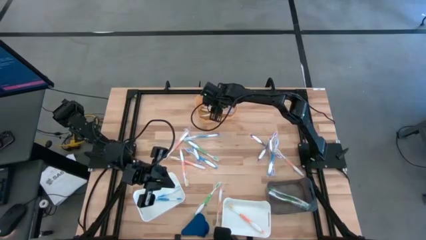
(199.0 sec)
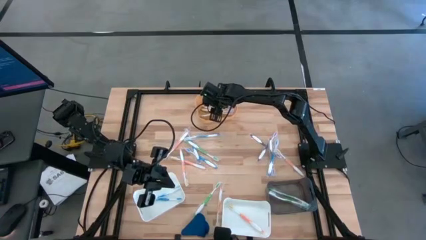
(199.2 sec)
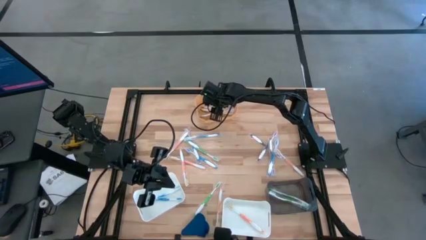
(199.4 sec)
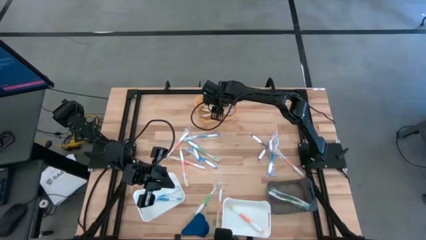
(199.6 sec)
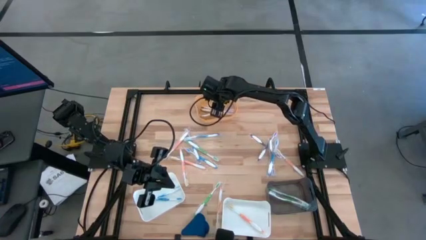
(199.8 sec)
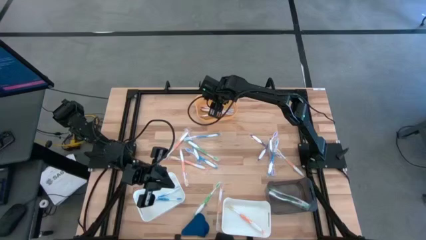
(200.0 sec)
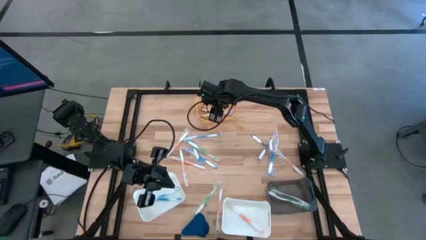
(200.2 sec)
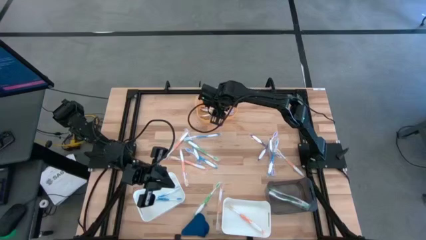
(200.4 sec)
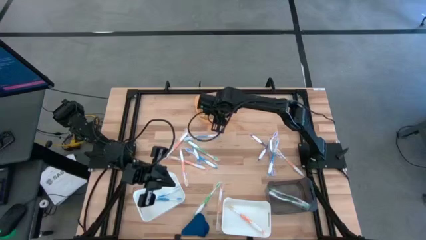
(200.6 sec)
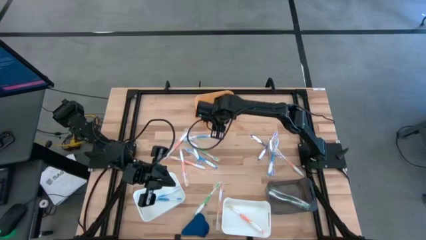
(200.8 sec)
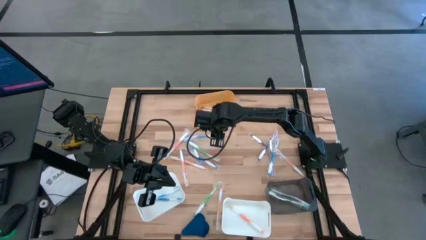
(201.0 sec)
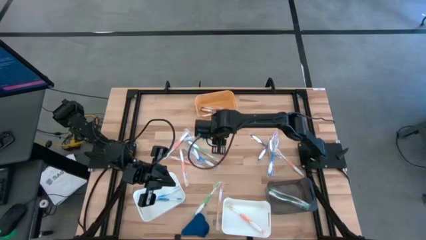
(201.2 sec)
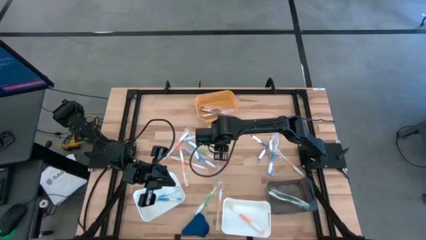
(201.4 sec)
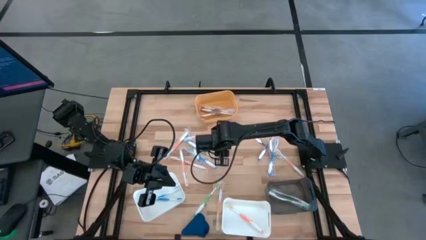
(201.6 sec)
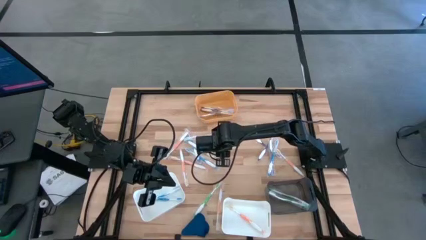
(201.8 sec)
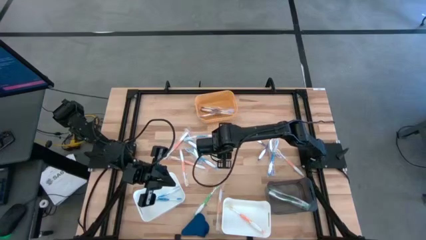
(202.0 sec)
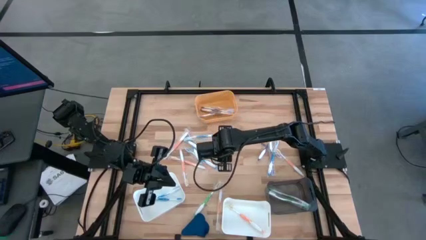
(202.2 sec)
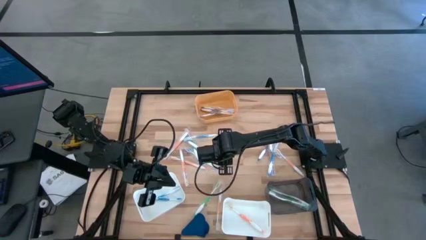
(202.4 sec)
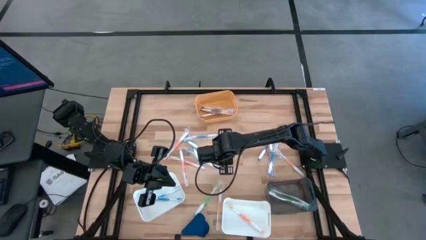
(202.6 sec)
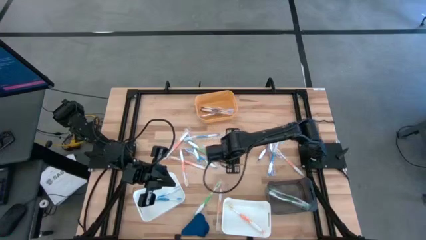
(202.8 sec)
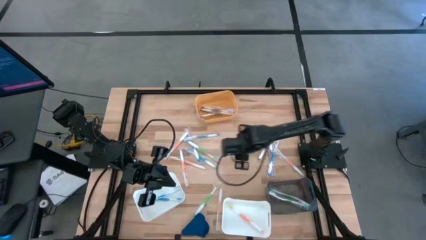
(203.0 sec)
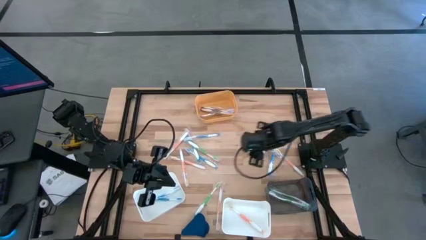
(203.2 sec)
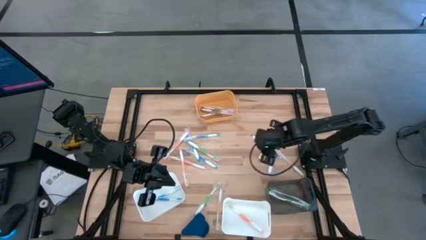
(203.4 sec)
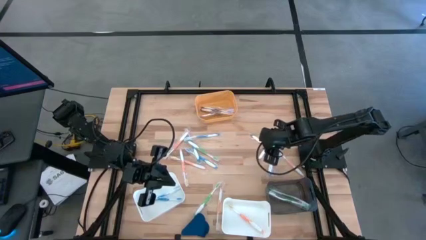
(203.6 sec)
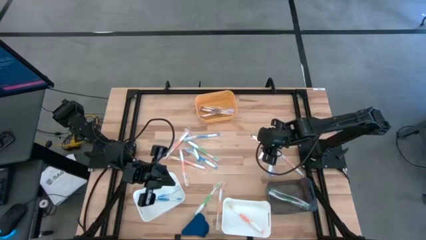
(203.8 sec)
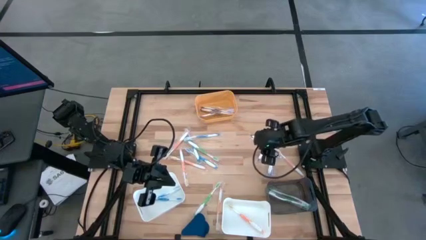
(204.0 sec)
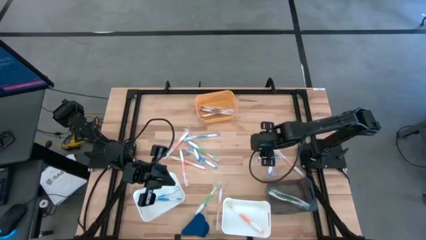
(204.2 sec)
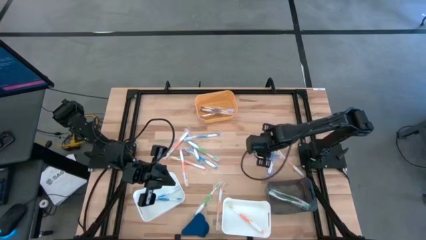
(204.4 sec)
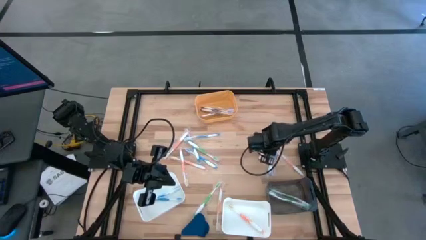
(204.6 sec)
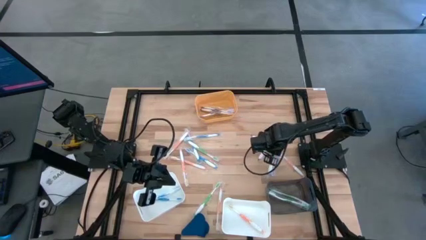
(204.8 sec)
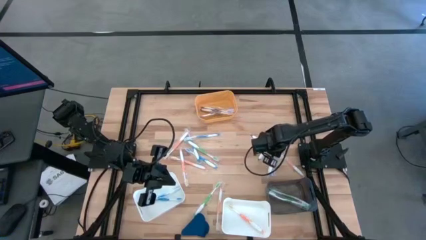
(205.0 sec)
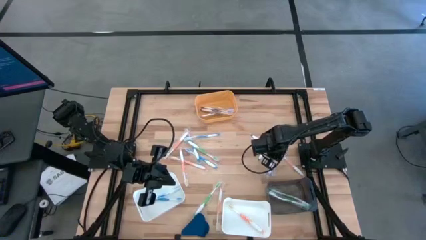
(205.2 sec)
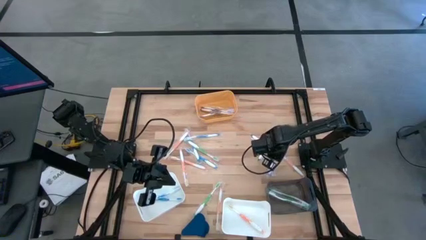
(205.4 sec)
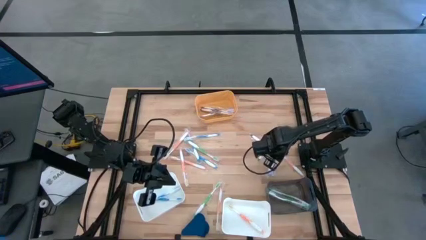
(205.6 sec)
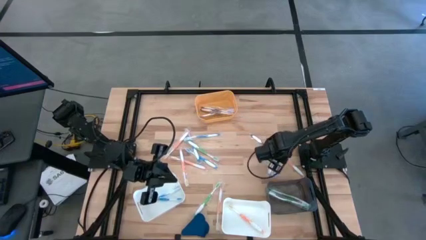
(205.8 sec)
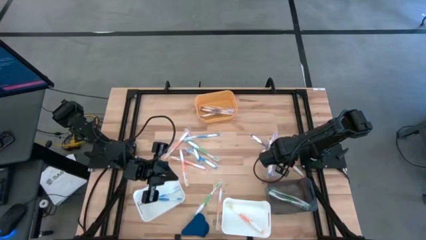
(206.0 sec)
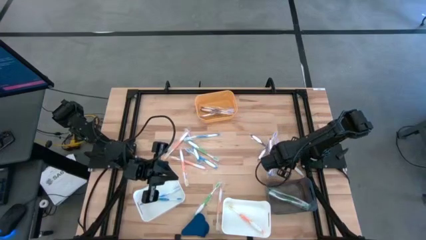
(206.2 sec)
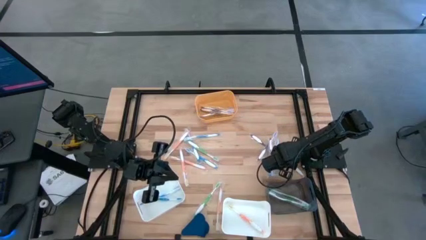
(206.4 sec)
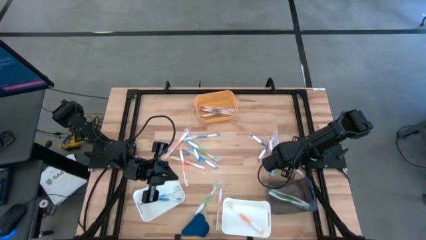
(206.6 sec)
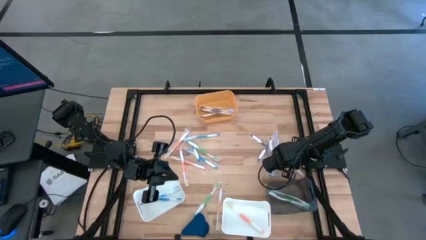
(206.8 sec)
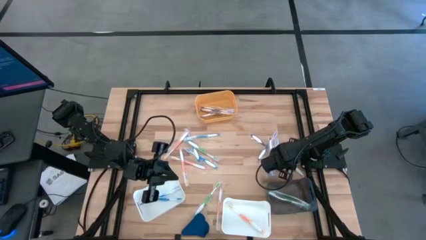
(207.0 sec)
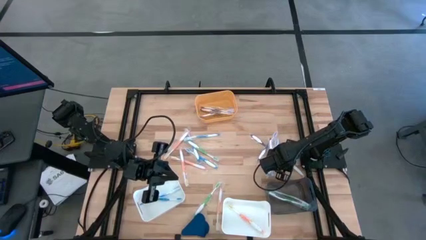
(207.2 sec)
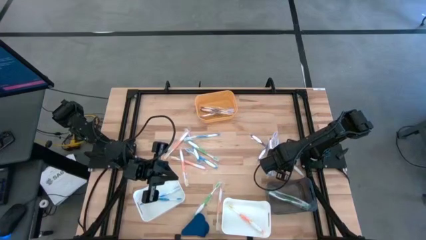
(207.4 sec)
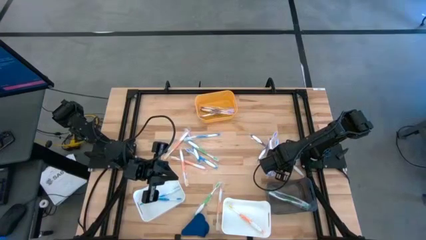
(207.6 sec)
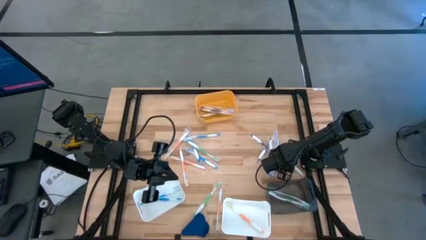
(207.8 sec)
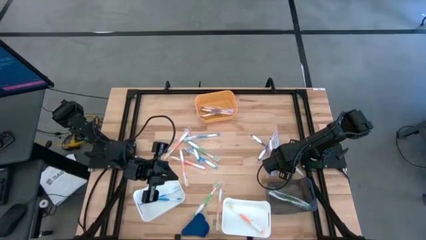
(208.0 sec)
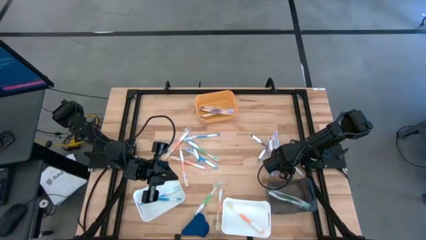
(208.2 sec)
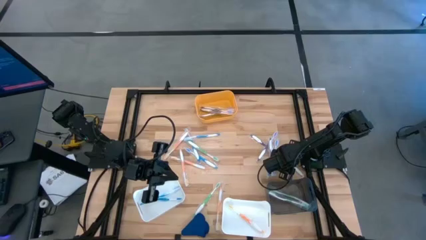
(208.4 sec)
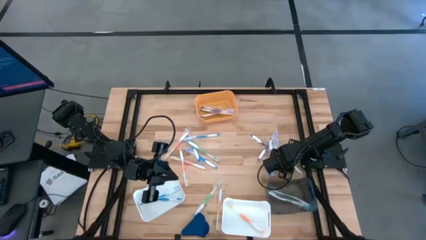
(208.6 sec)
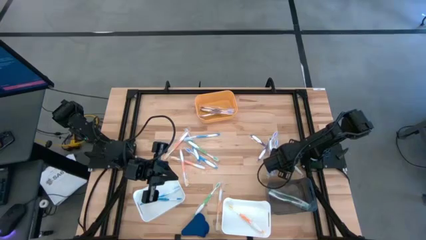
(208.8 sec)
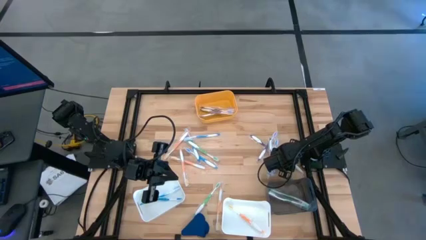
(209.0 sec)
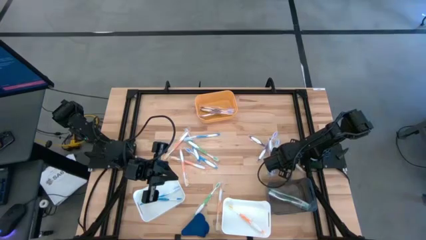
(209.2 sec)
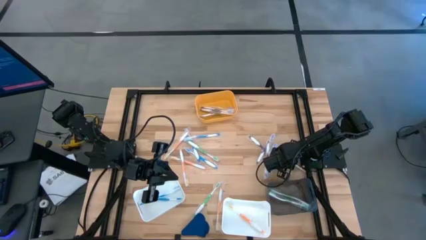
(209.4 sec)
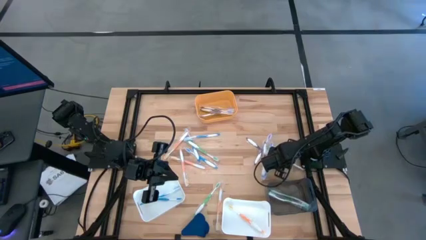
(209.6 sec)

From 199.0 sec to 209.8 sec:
Task: Pick & Place Toothbrushes
Put the orange toothbrush into the right white bin

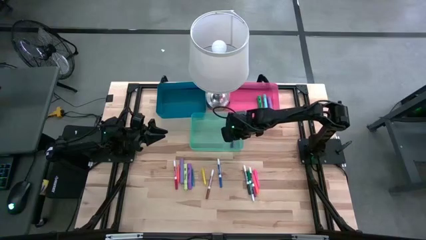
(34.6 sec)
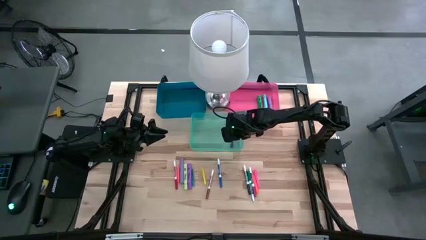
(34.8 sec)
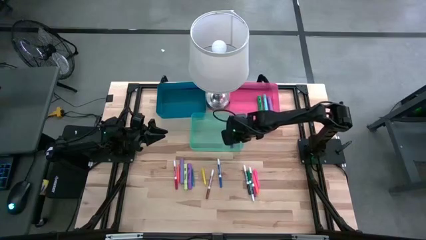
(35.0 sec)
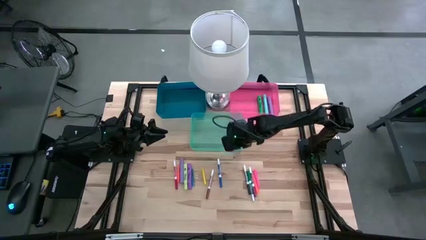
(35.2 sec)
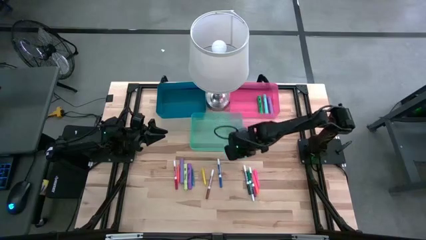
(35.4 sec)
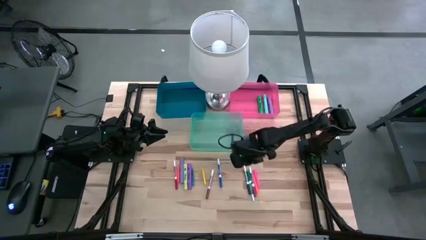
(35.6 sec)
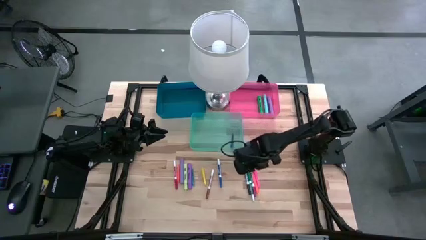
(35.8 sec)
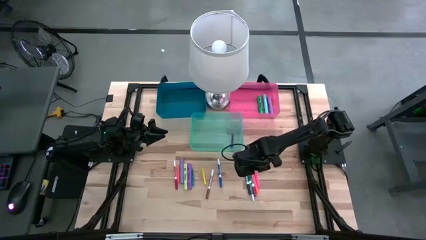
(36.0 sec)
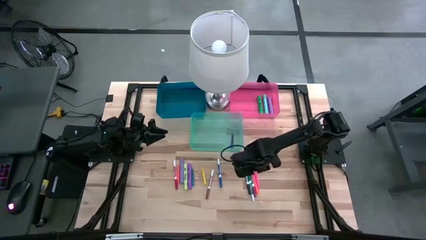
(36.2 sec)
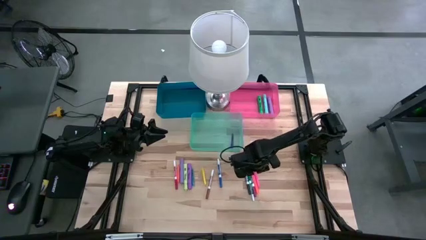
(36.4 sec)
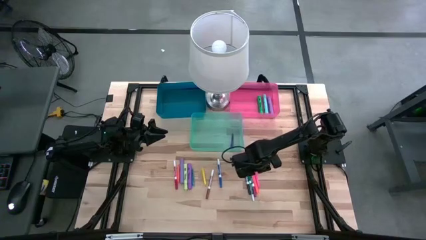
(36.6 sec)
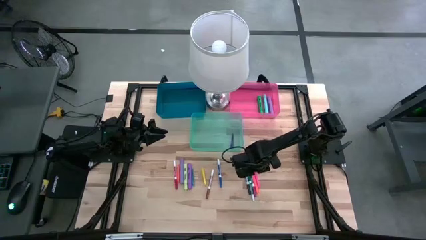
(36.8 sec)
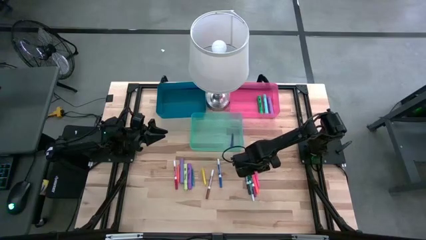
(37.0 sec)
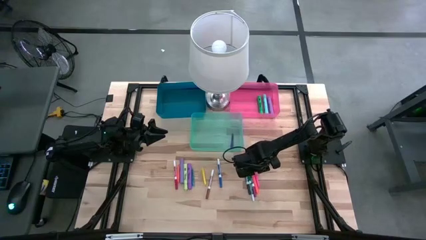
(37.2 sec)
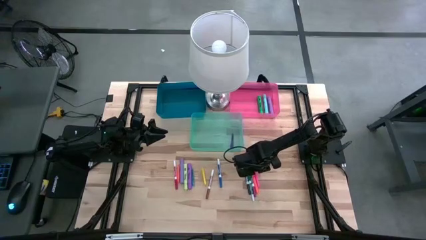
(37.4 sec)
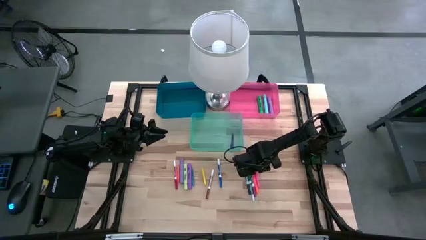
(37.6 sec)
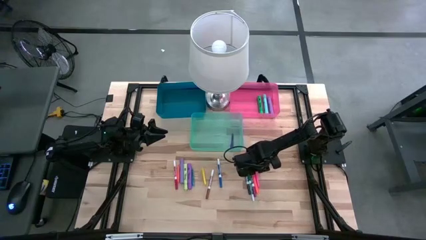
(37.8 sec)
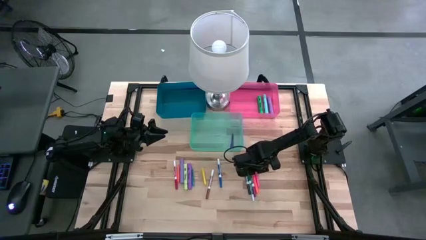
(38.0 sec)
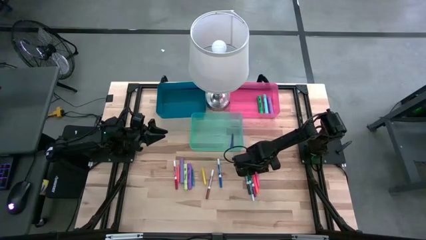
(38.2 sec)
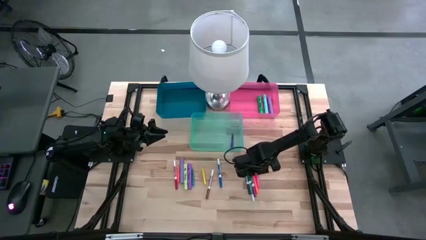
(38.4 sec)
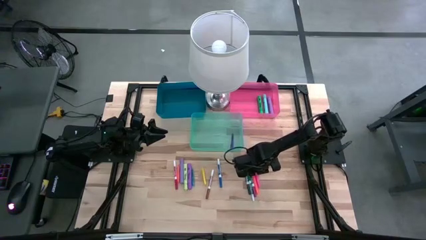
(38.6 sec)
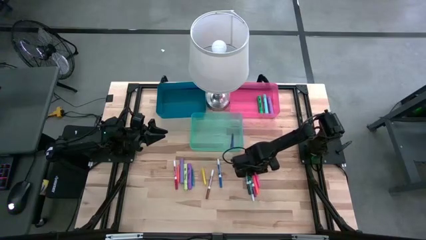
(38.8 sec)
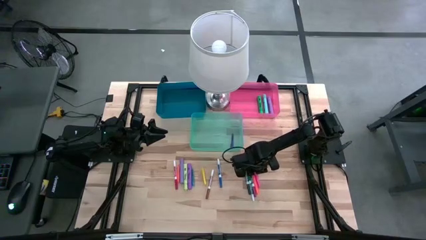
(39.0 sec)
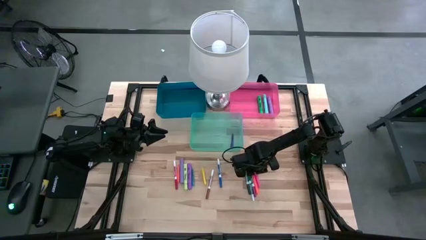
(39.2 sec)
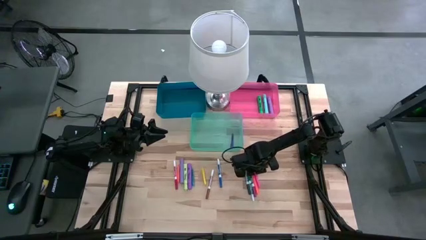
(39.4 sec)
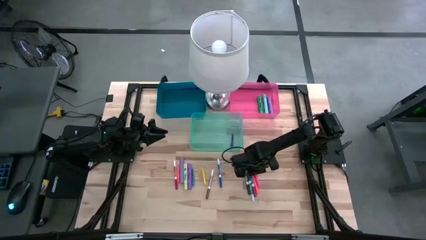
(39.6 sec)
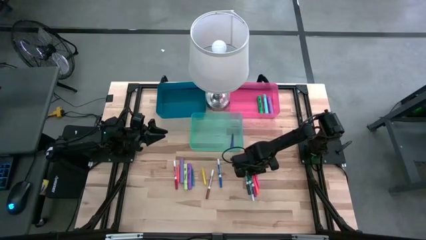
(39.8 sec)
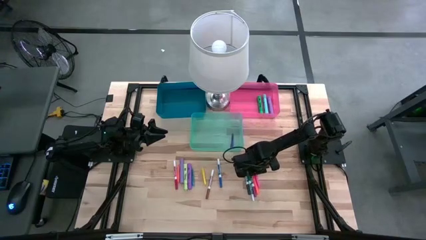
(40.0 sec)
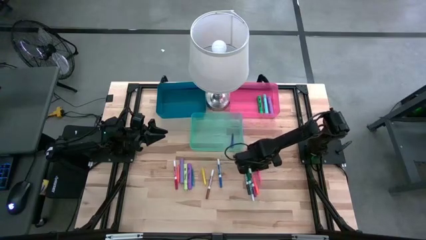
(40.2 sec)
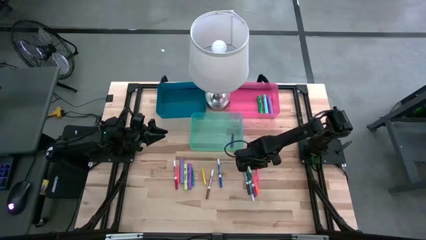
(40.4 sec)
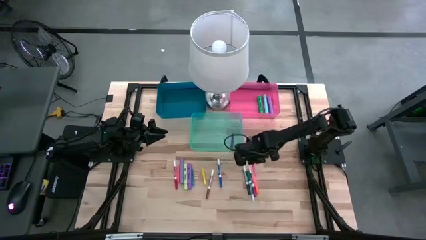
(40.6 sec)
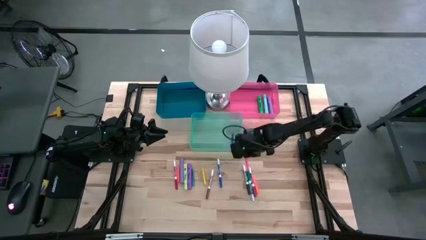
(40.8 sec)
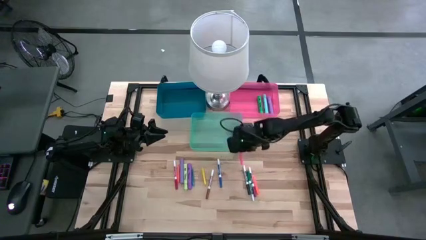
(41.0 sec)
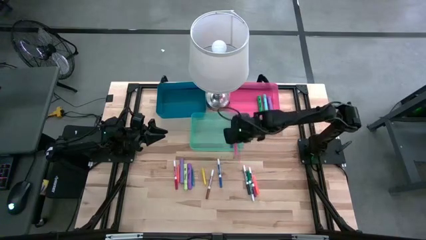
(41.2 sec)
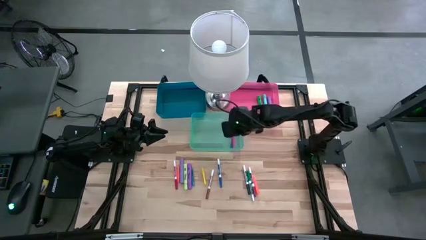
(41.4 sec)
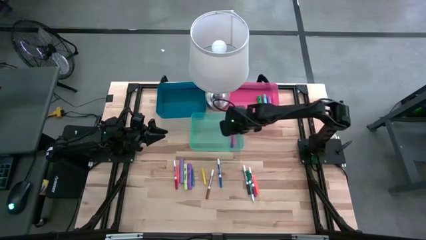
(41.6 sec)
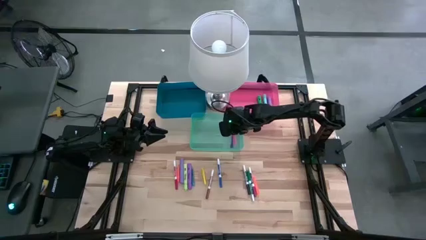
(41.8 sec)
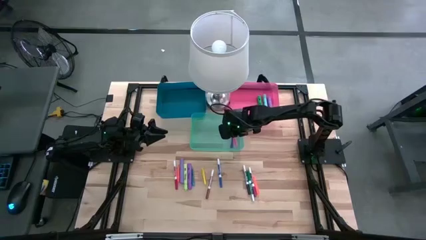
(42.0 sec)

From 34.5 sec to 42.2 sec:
Task: Pick & Place Markers
Put the pink pen into the green bin
